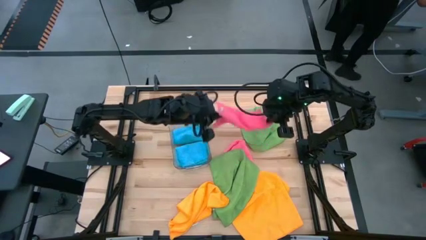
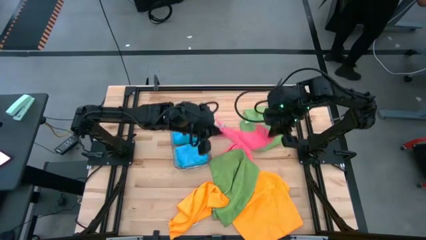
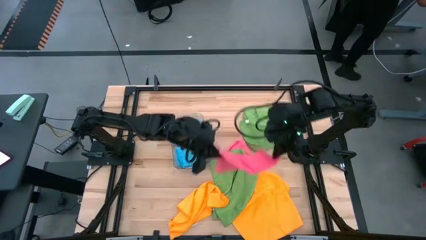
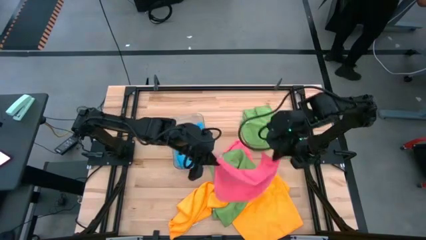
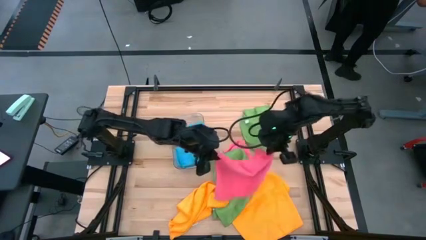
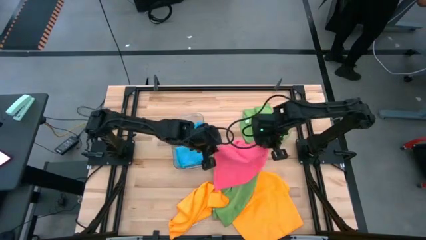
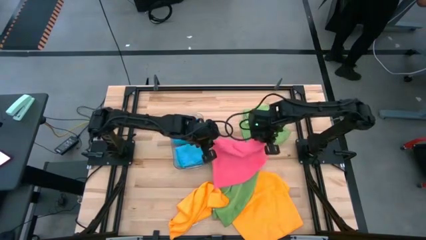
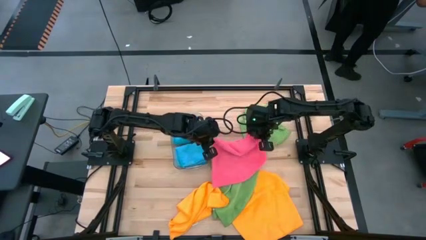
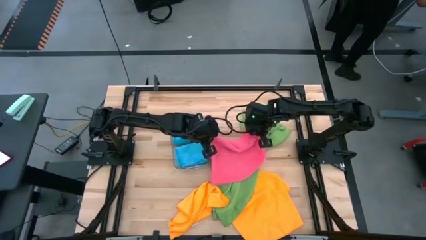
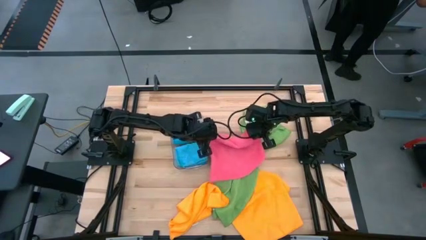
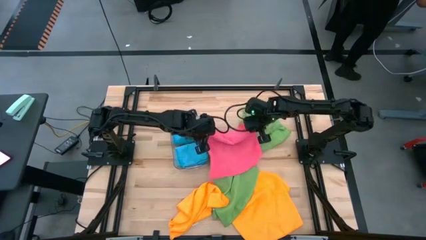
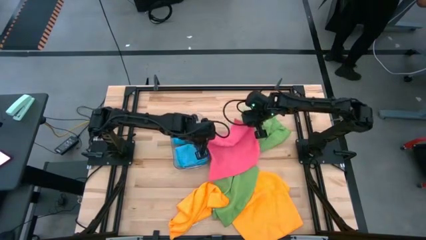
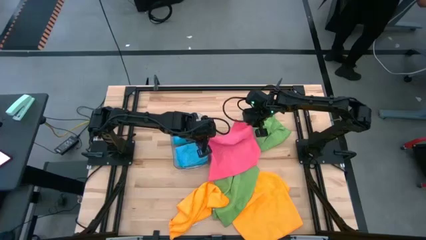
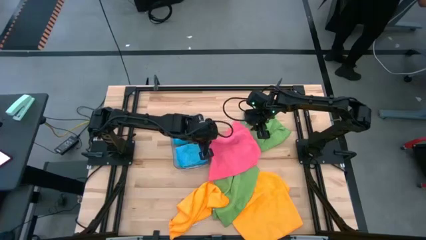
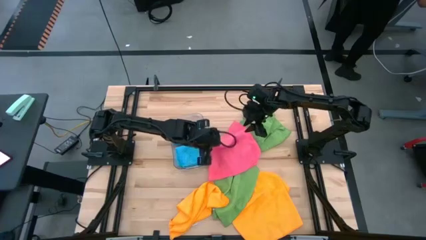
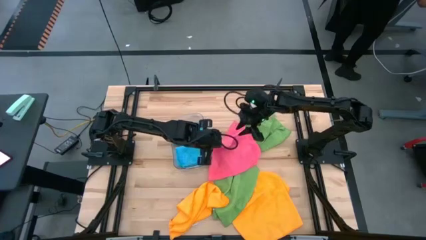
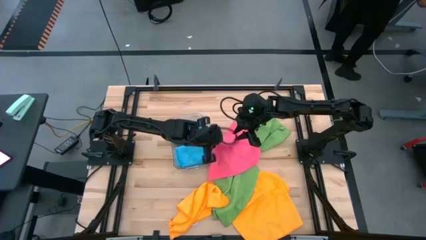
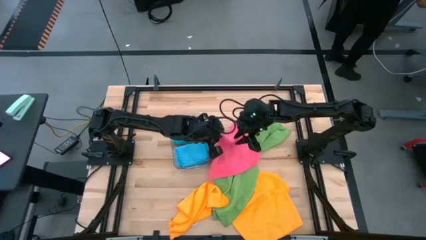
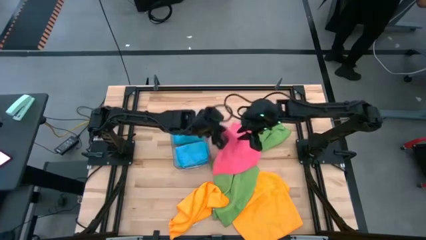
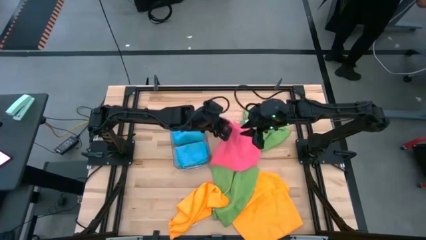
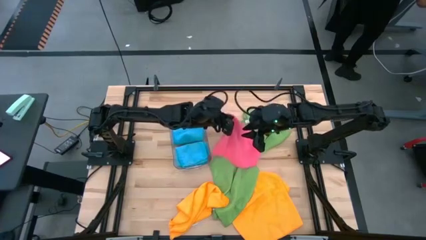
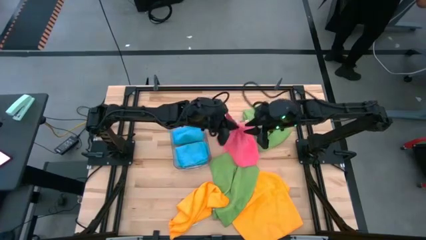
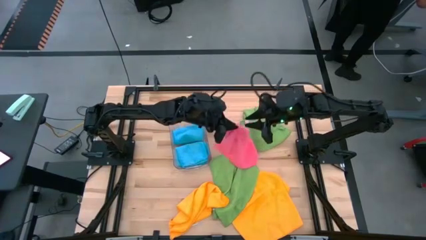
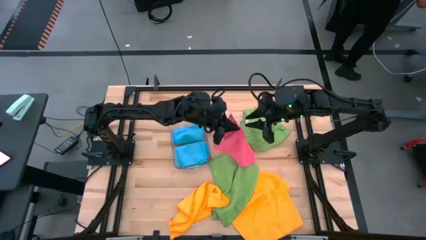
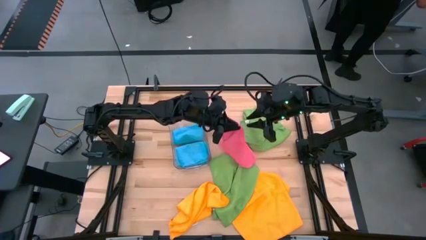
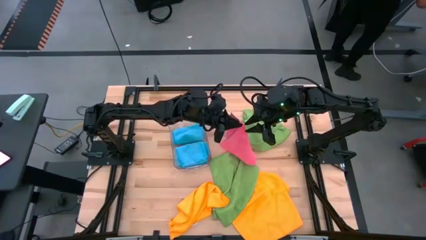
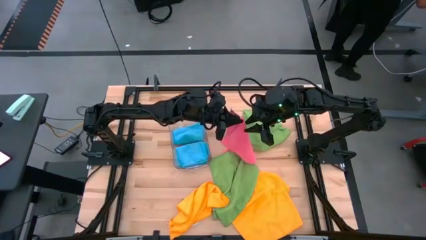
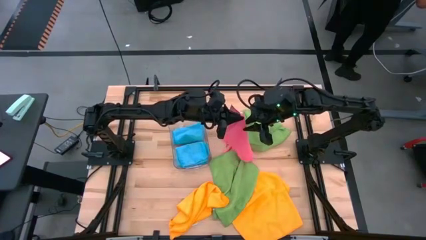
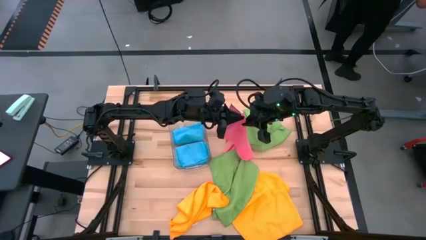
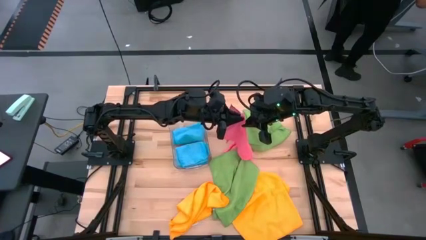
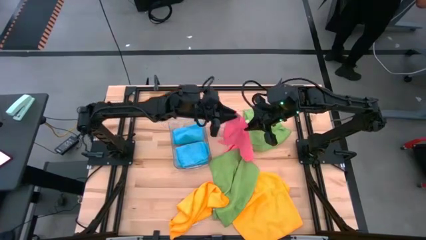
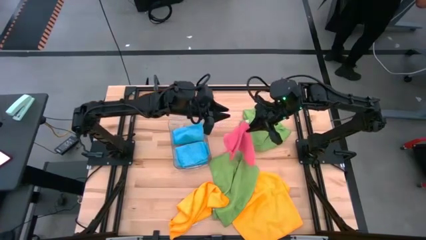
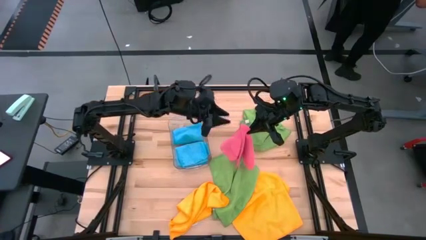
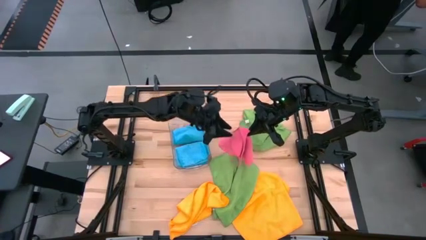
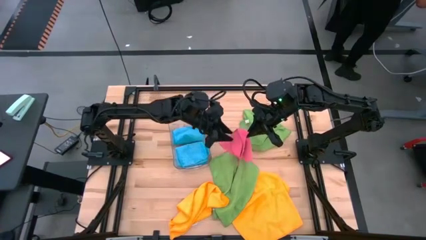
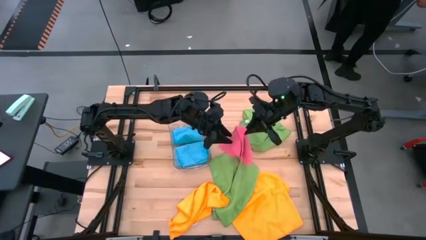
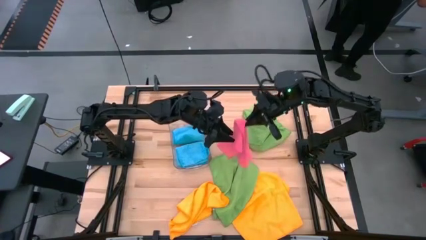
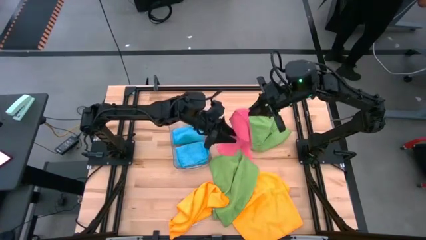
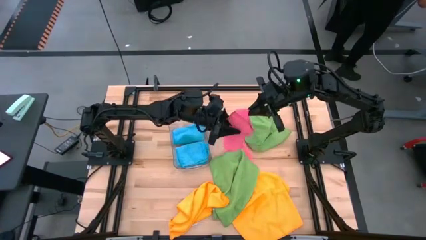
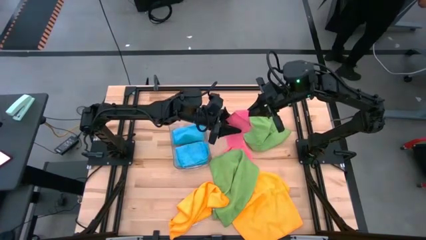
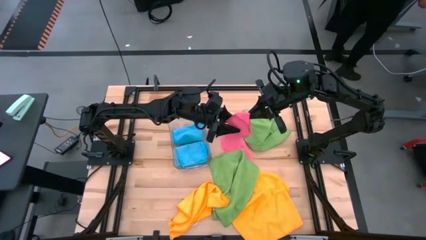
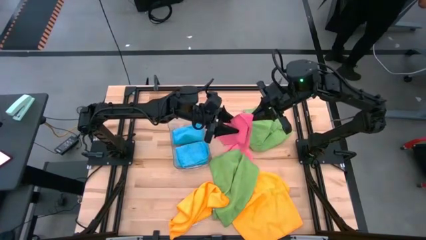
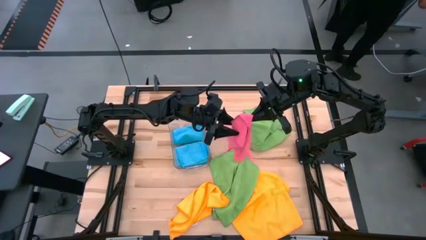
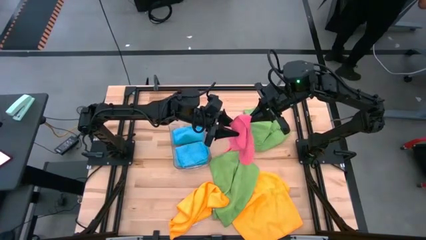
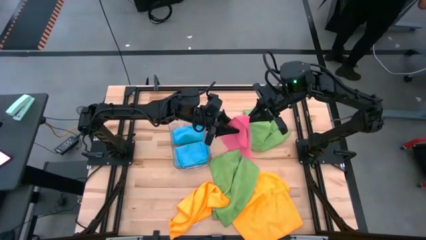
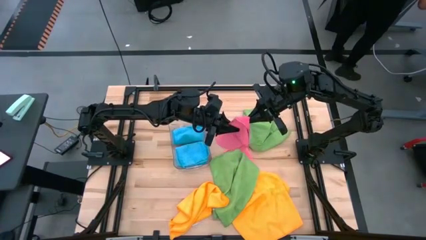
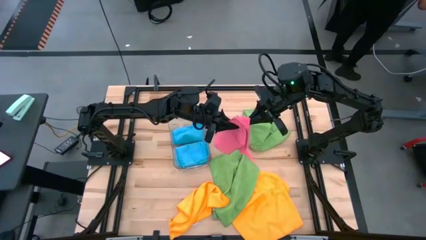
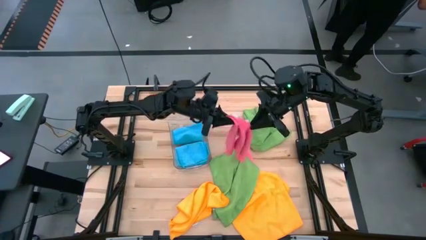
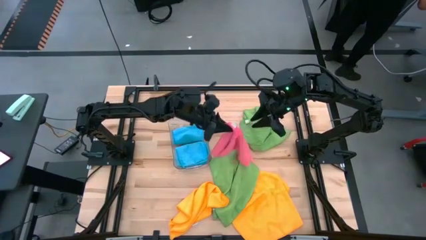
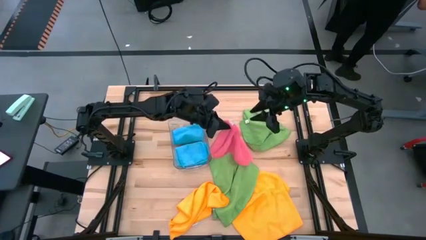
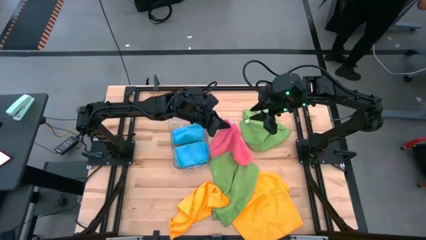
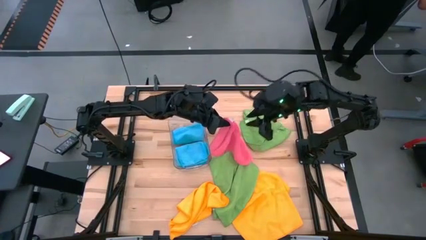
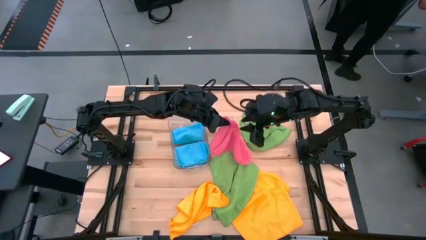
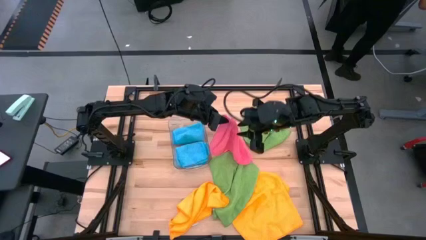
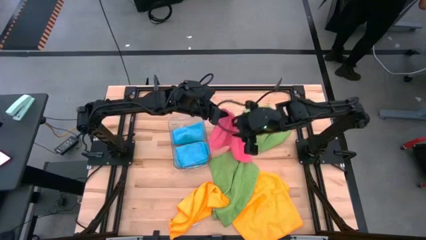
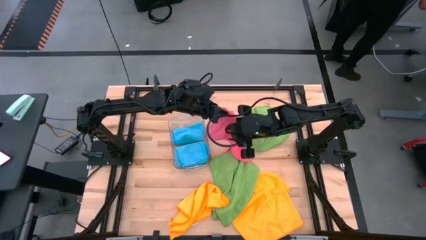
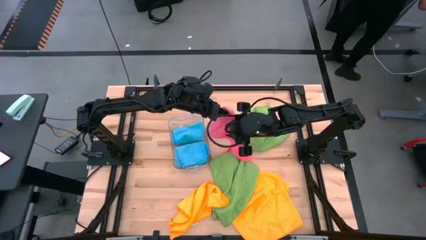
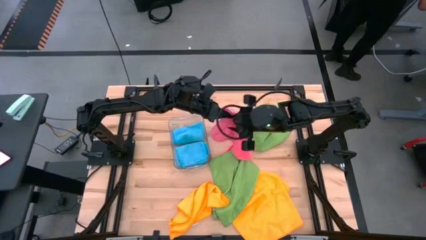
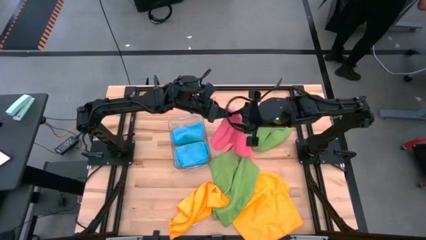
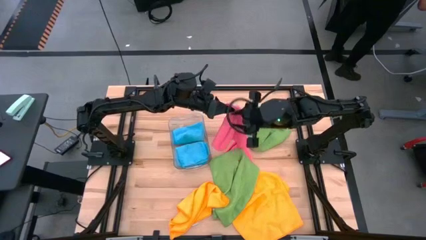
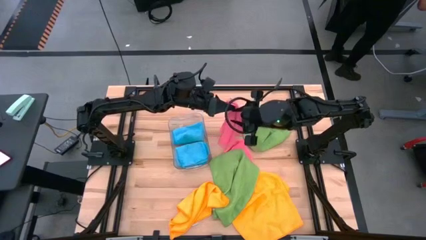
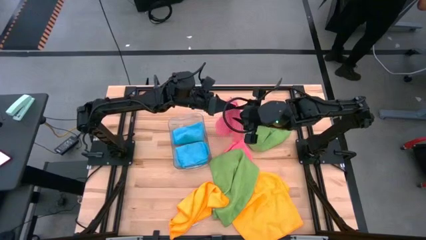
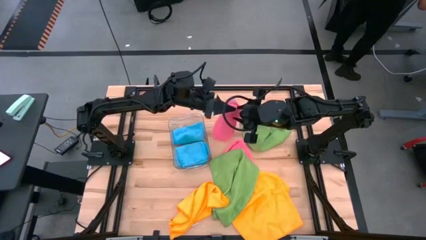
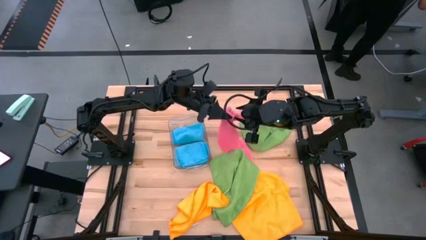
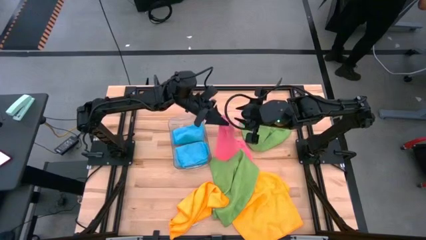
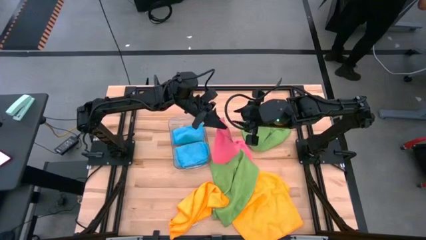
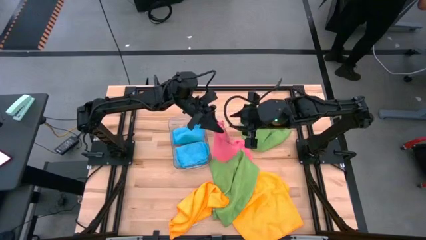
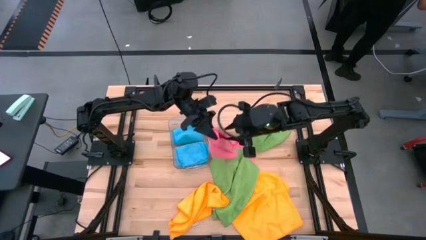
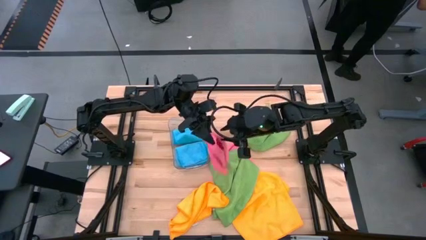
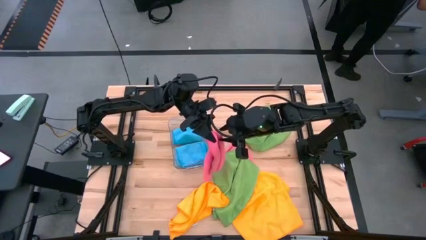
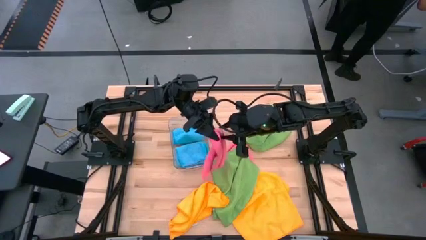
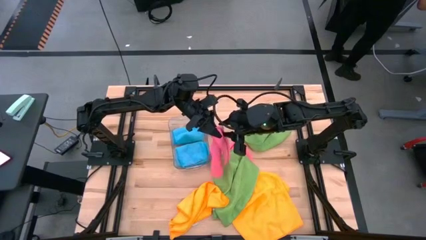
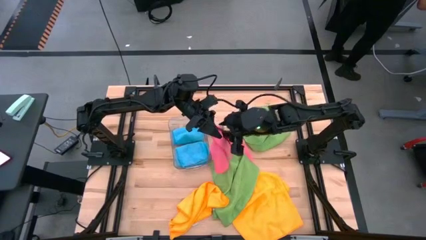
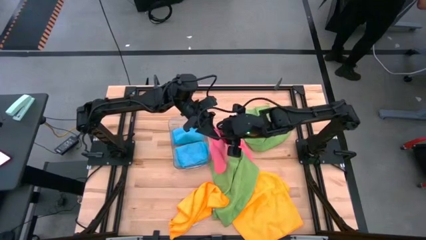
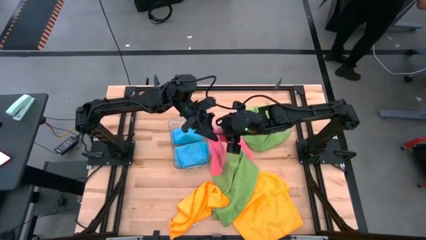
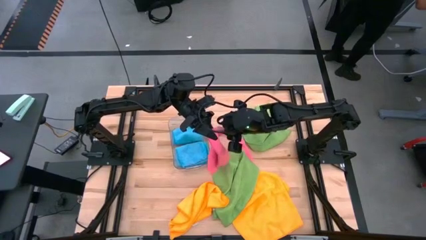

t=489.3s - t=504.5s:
Task: Fold microfiber towels
Fold the top pink towel
